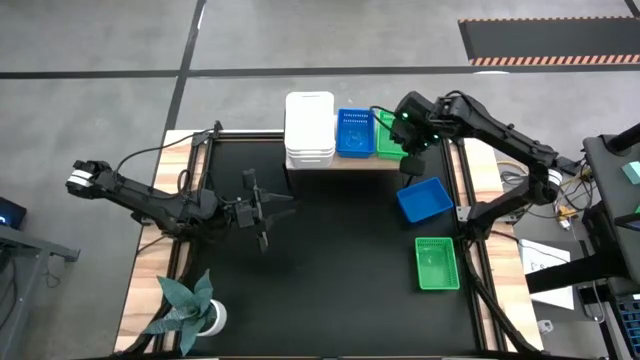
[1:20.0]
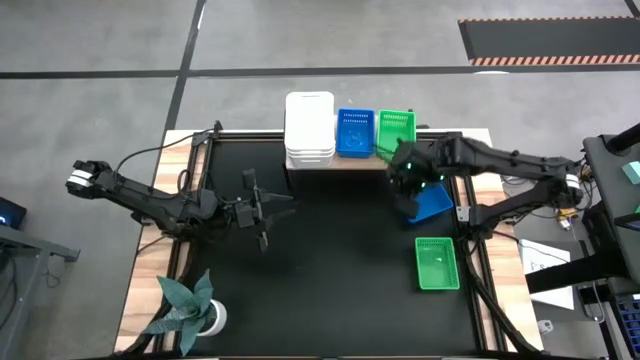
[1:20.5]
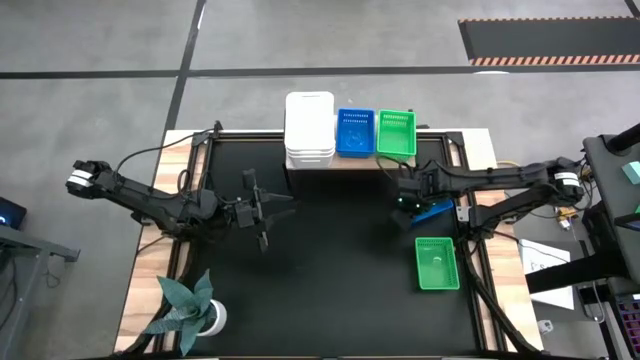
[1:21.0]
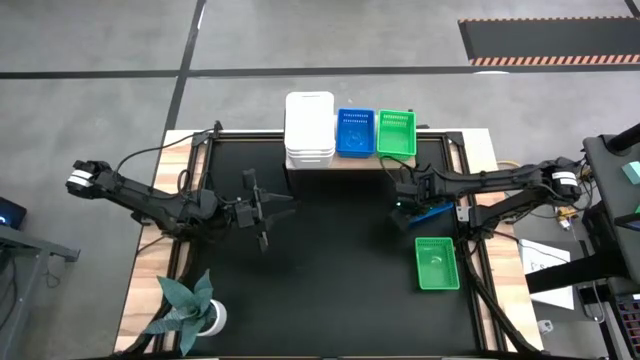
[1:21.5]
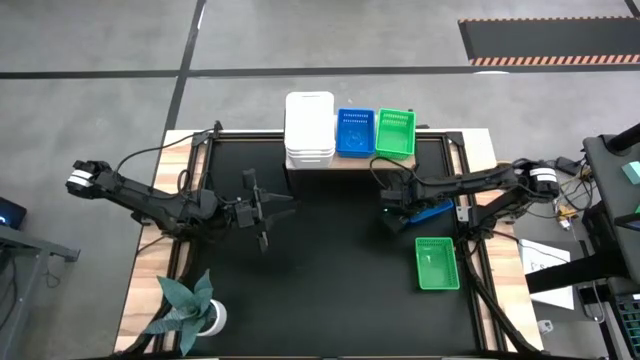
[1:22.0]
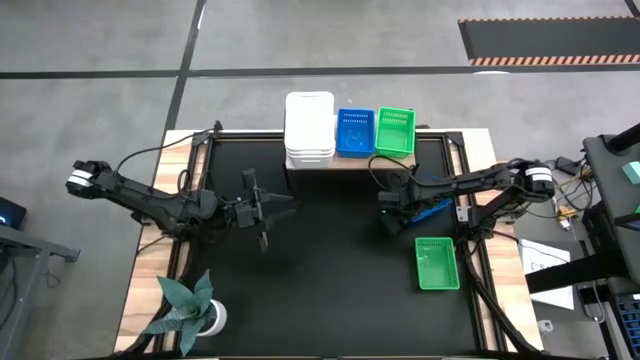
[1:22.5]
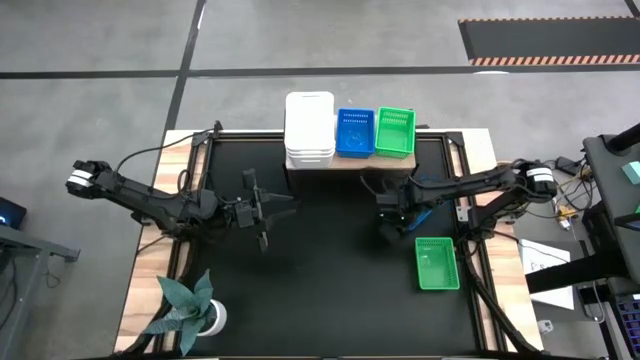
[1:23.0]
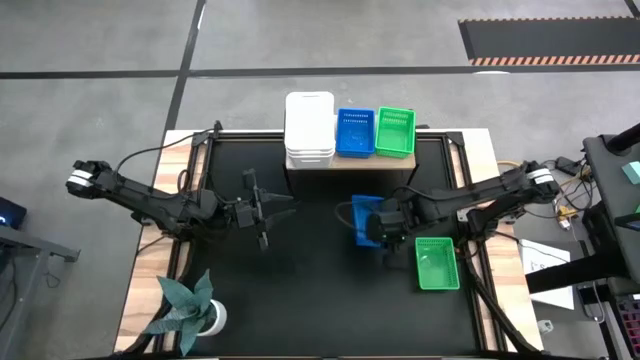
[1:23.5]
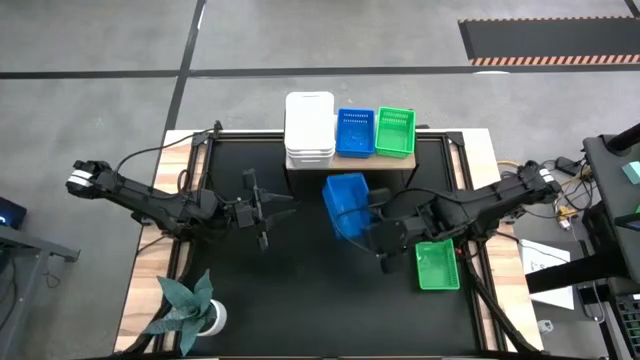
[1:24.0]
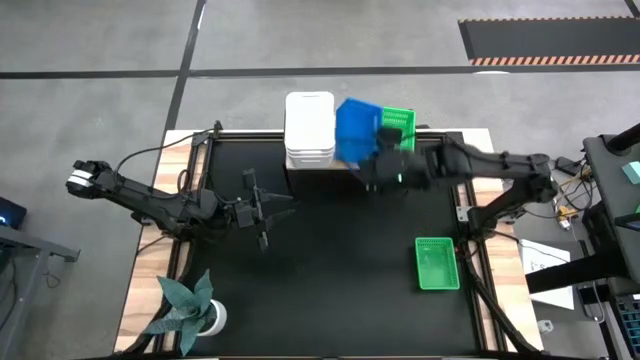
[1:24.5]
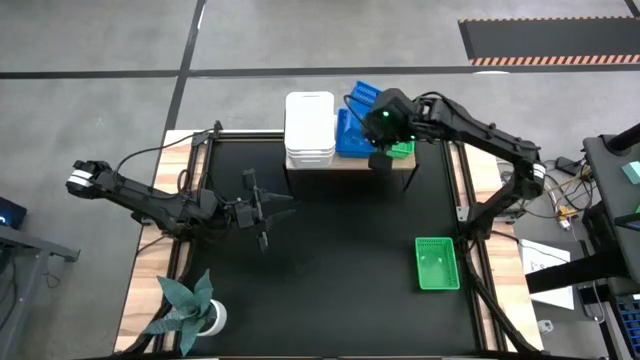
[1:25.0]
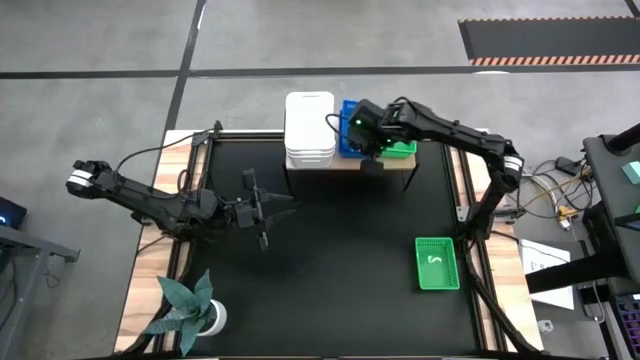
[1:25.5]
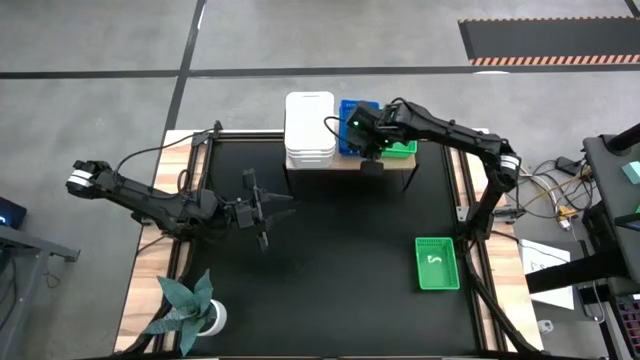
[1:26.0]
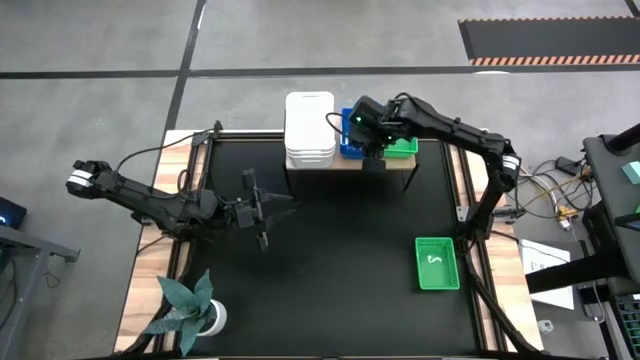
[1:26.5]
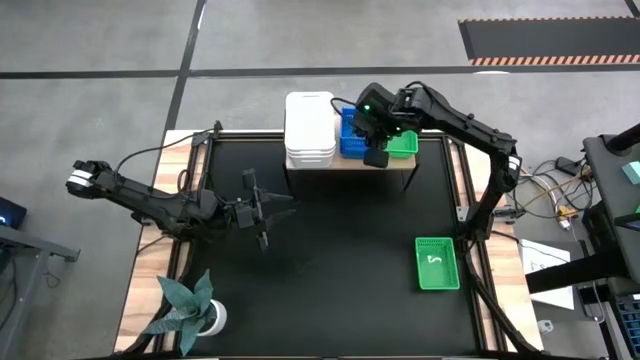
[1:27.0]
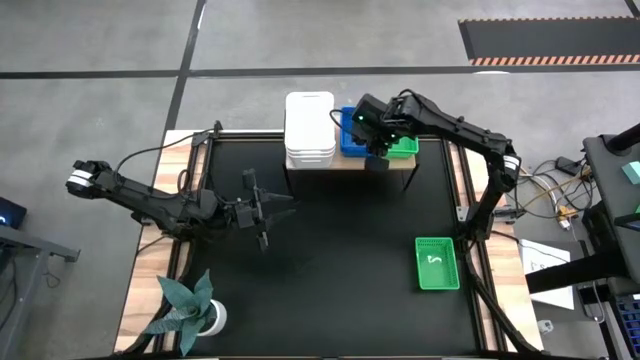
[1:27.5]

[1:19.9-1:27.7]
Task: Stack baskets on shelf by color
Stack the blue bin on top of the blue bin on the shelf

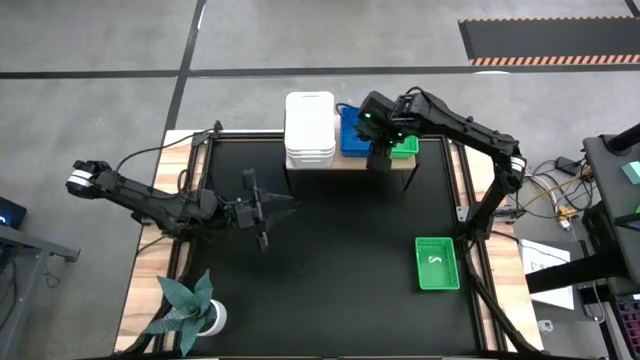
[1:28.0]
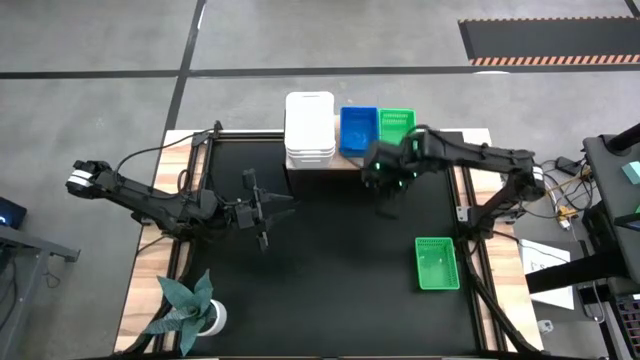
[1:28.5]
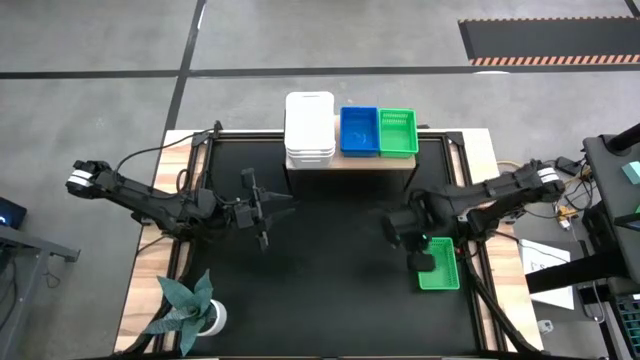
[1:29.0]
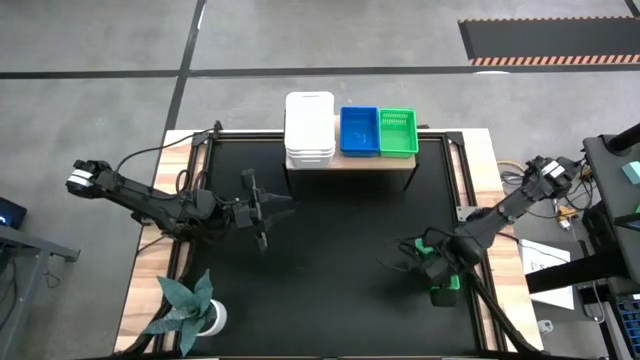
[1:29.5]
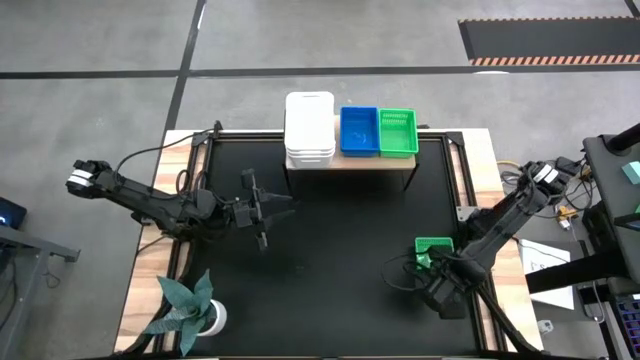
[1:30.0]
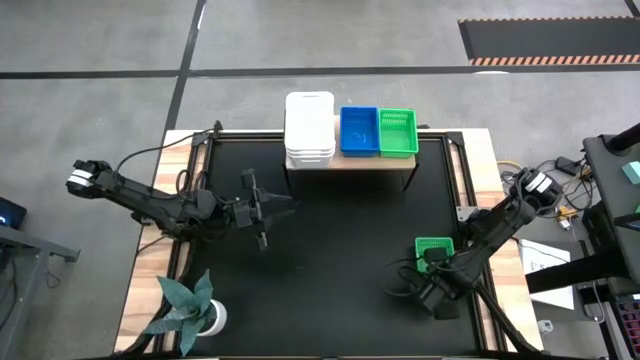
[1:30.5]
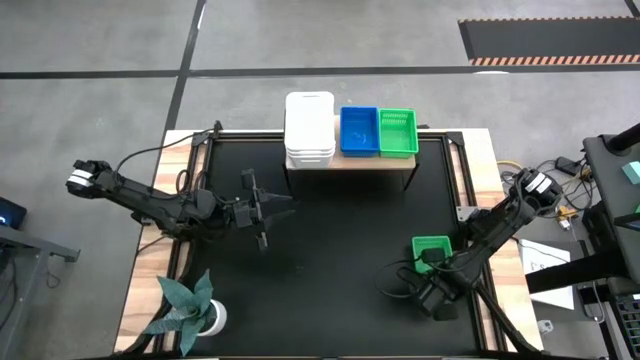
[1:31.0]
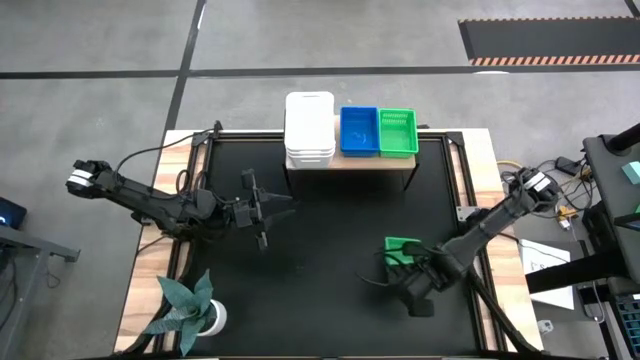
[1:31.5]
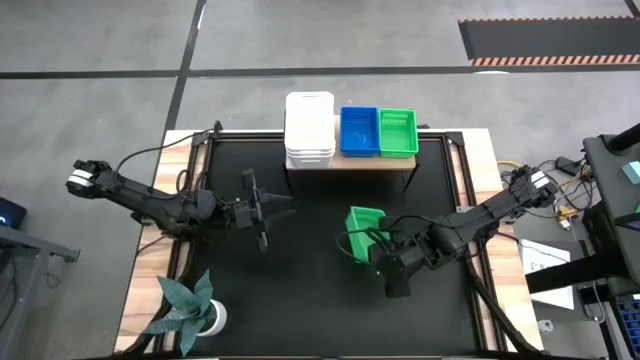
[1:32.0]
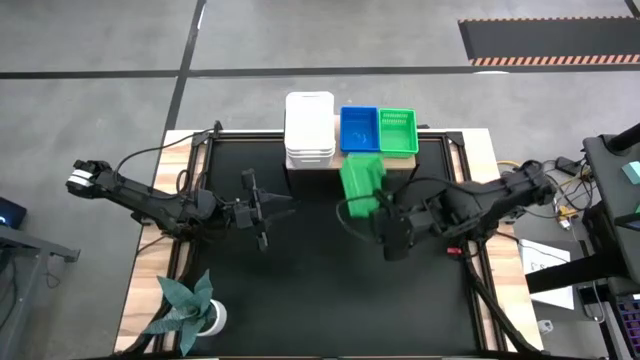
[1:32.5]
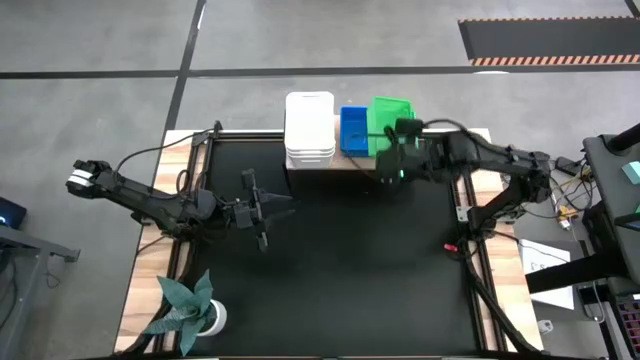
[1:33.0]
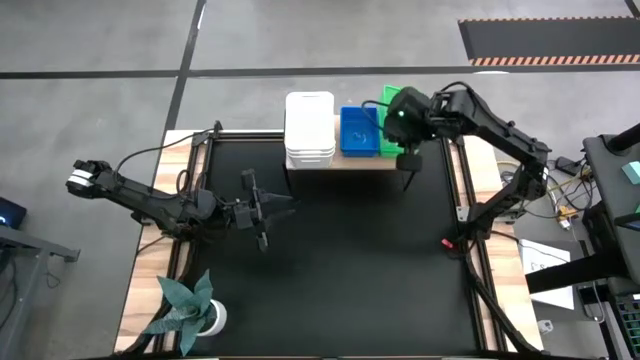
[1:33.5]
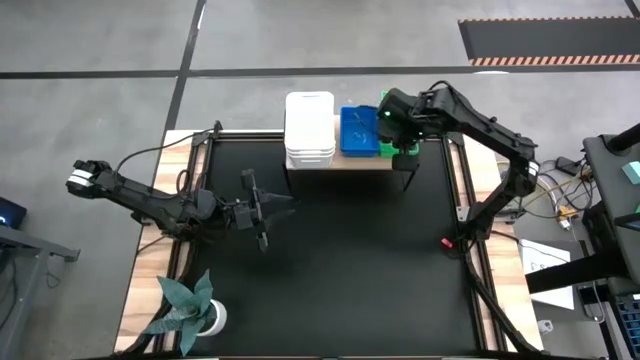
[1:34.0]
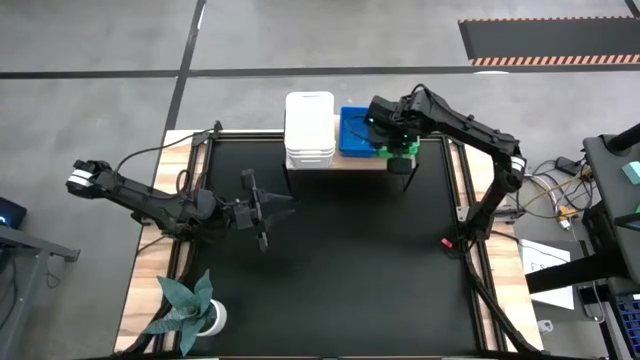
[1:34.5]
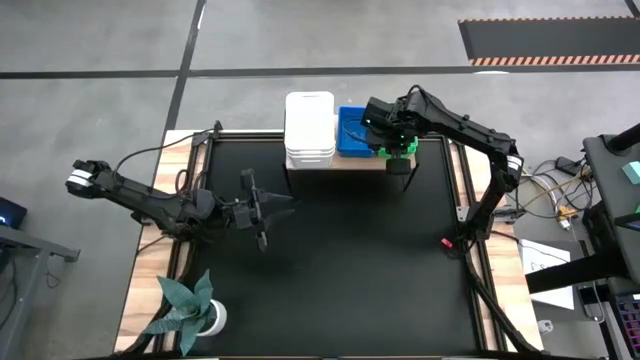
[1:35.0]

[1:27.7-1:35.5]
Stack the green bin on top of the green bin on the shelf

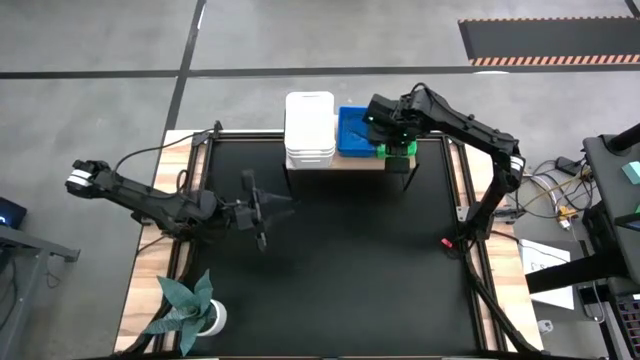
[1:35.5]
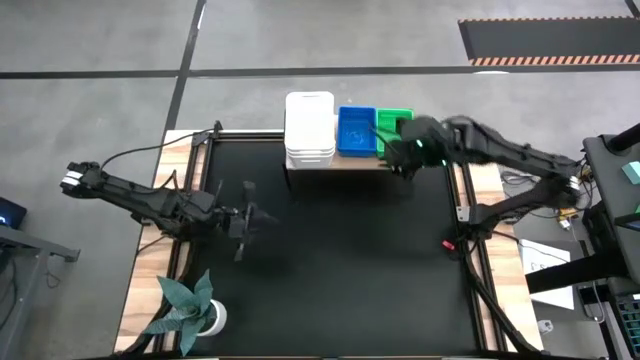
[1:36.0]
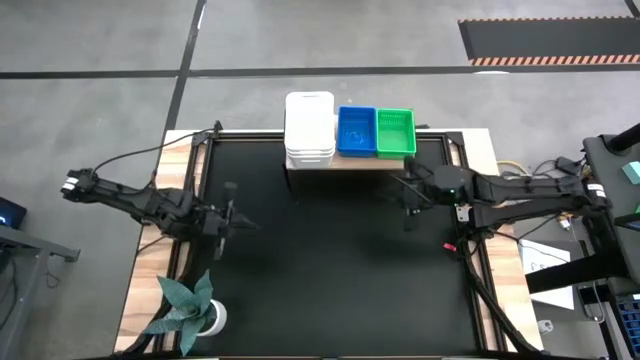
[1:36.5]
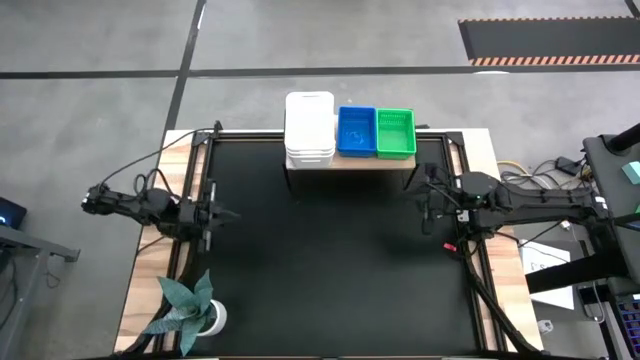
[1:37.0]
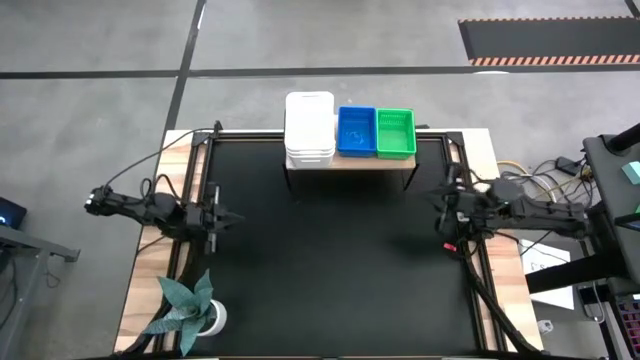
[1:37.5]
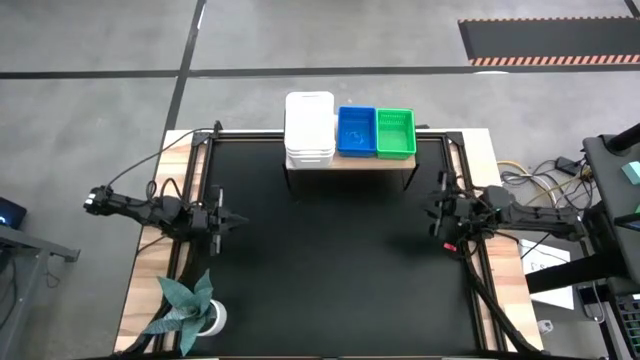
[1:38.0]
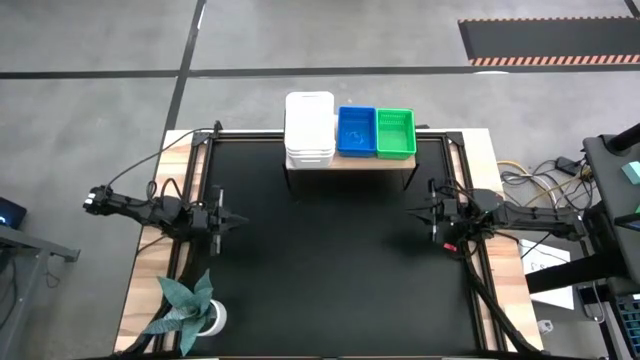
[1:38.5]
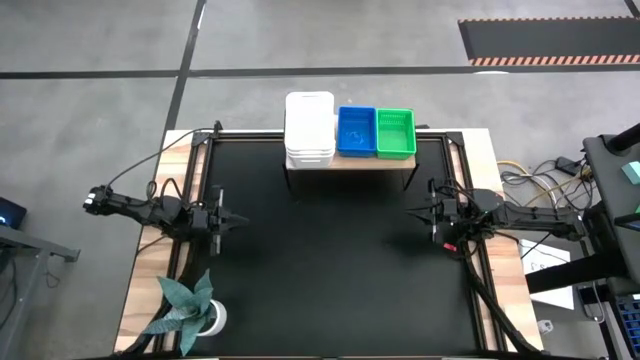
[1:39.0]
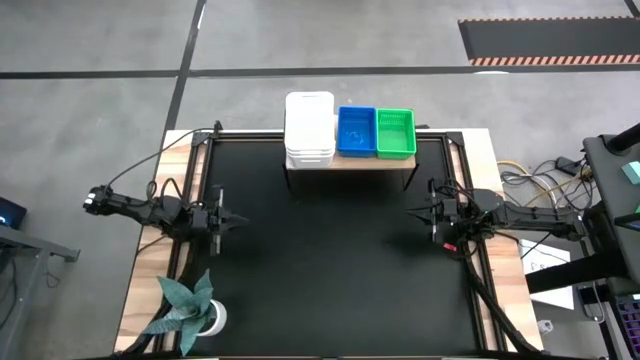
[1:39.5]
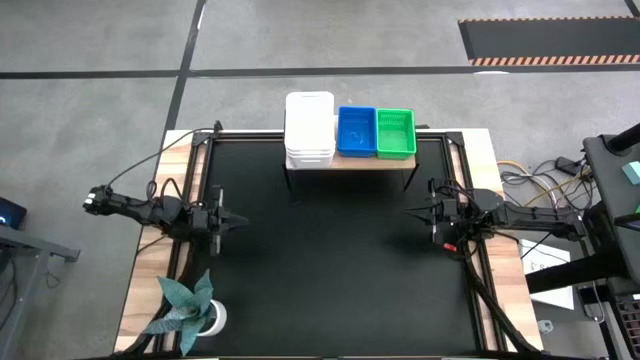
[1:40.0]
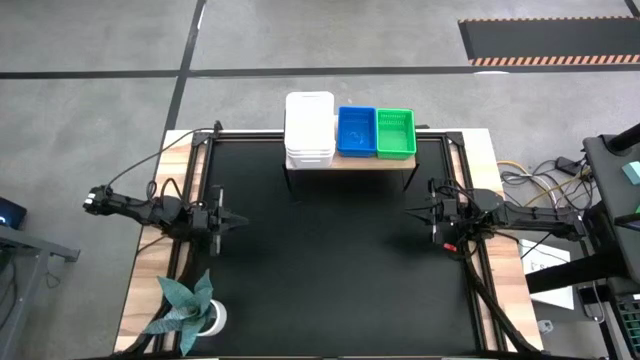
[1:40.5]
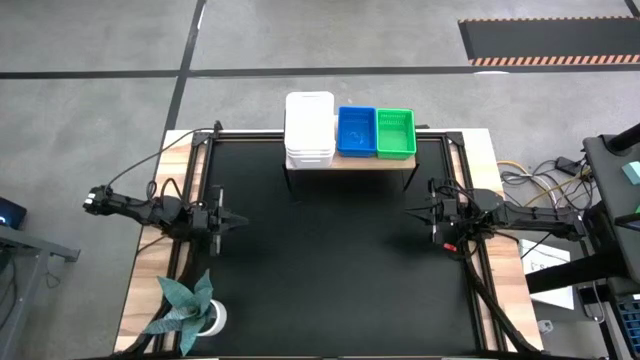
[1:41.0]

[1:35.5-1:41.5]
Return to Home Position
